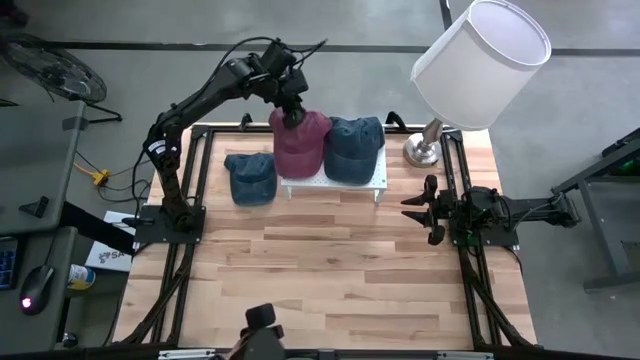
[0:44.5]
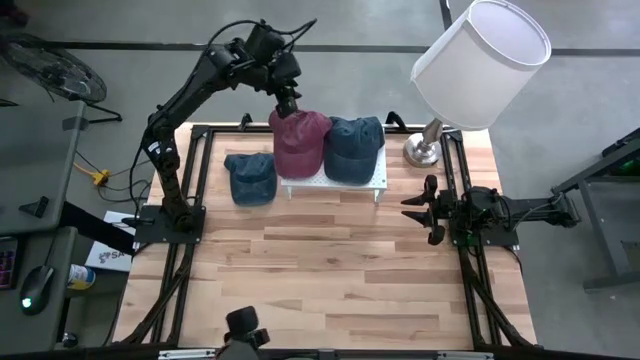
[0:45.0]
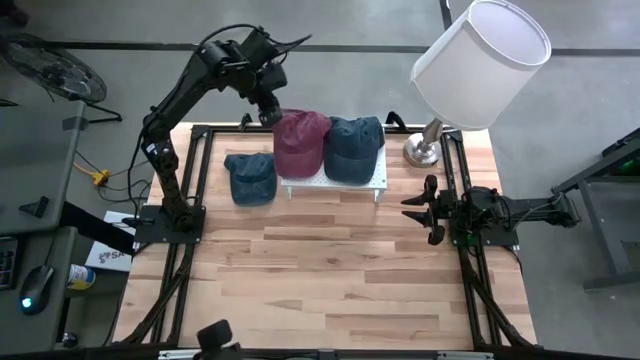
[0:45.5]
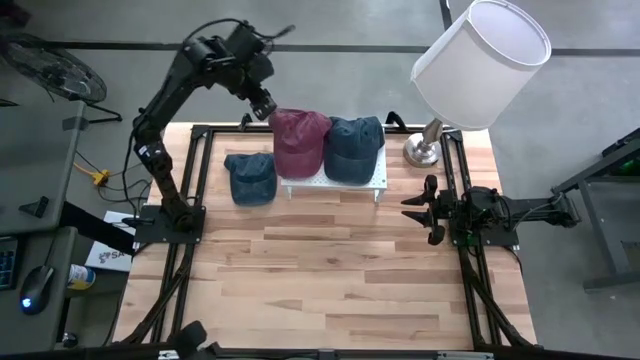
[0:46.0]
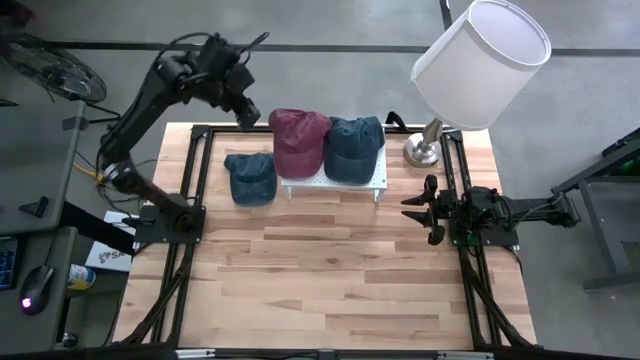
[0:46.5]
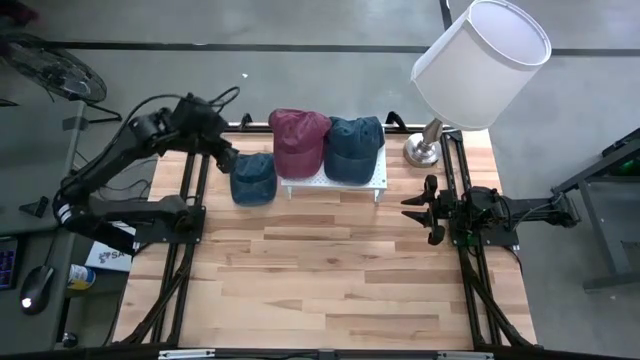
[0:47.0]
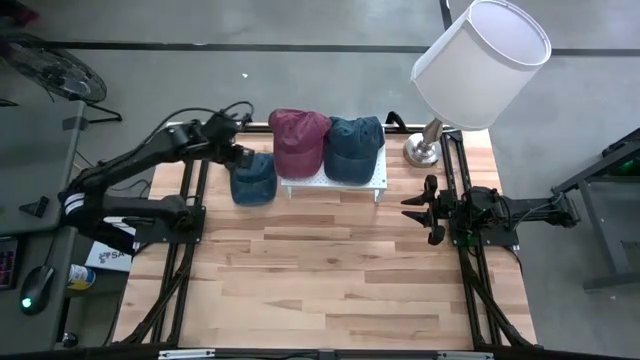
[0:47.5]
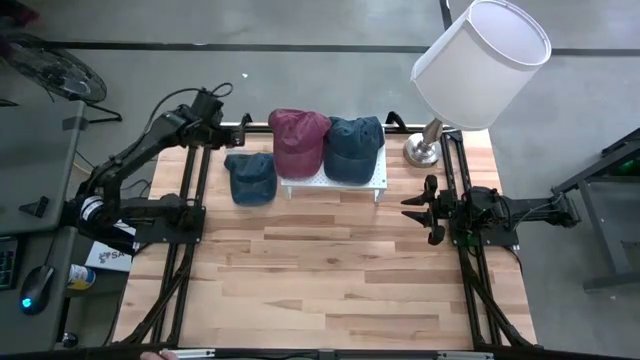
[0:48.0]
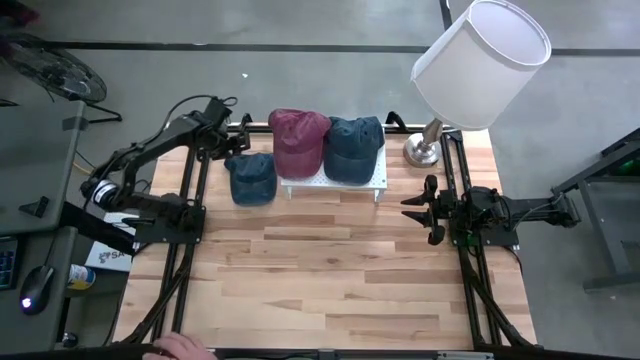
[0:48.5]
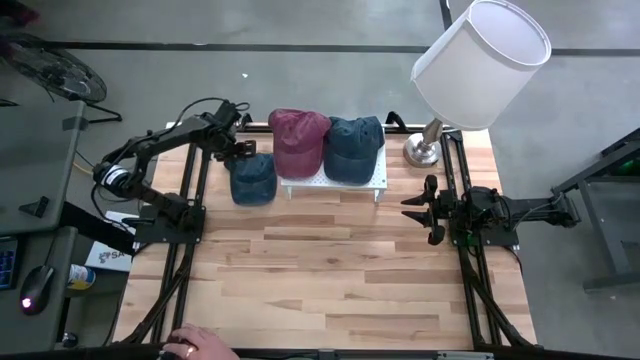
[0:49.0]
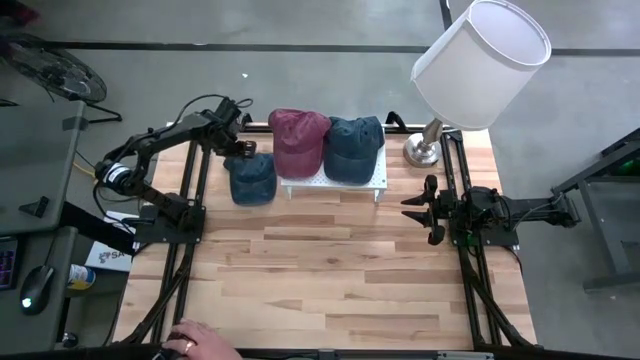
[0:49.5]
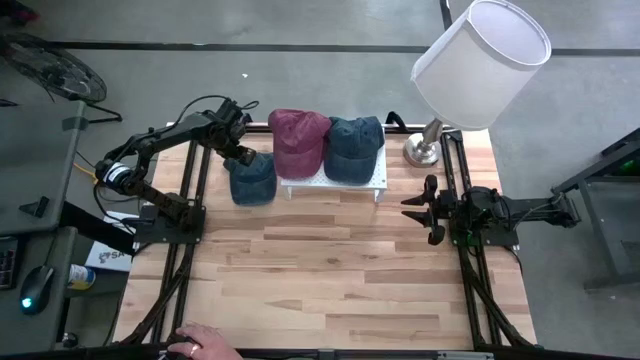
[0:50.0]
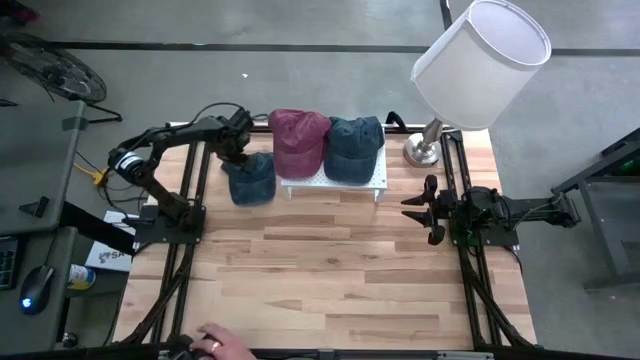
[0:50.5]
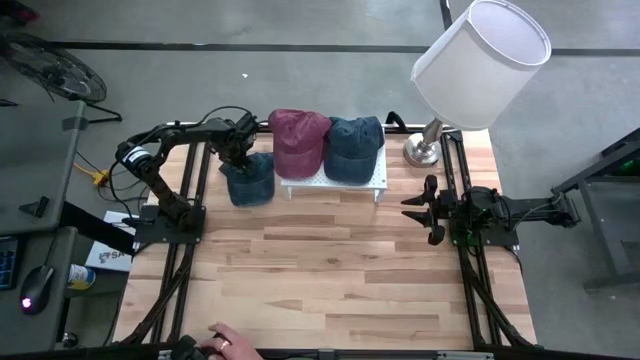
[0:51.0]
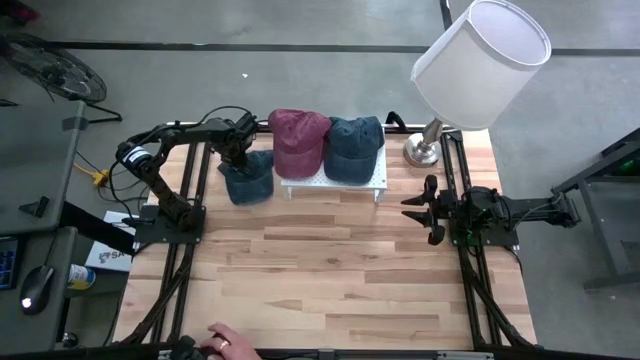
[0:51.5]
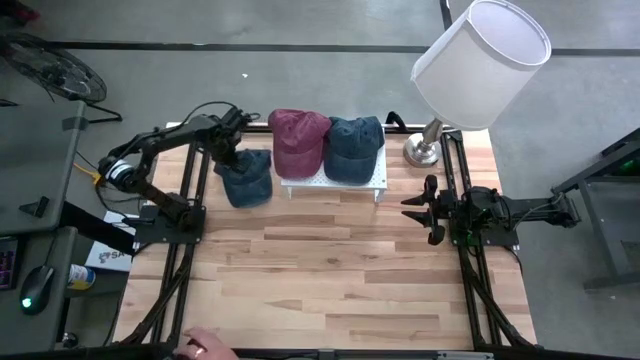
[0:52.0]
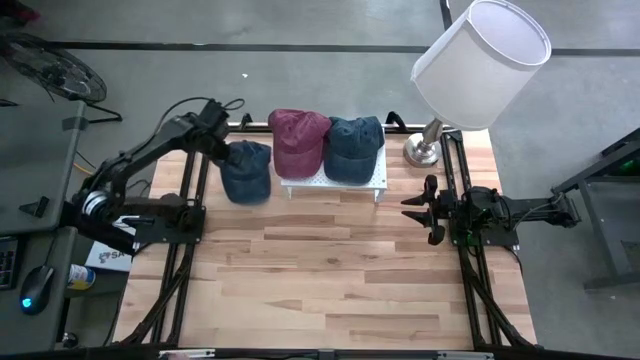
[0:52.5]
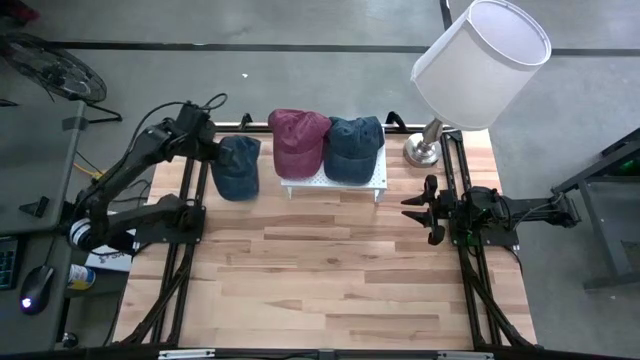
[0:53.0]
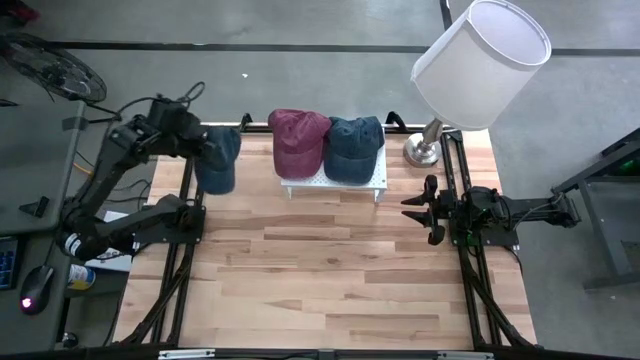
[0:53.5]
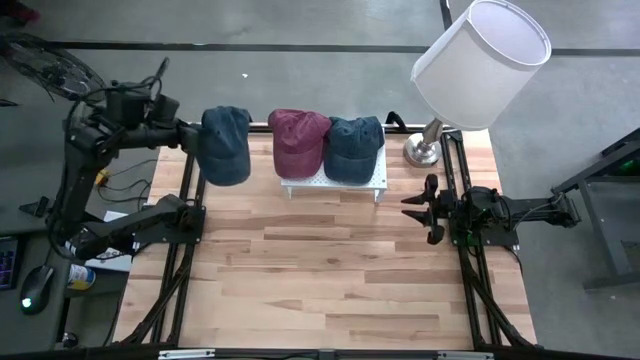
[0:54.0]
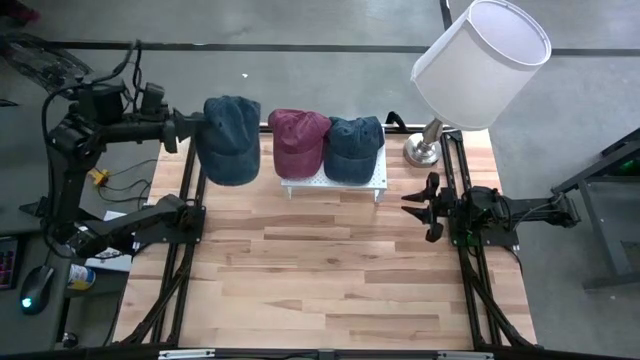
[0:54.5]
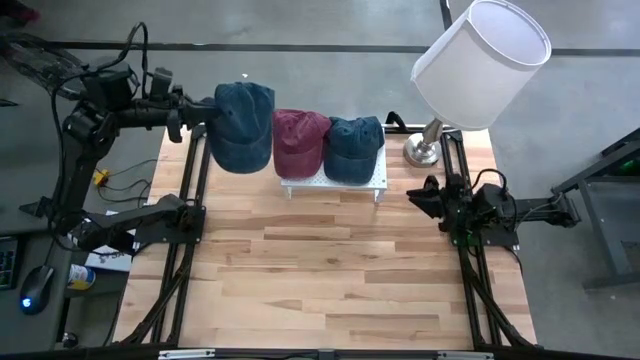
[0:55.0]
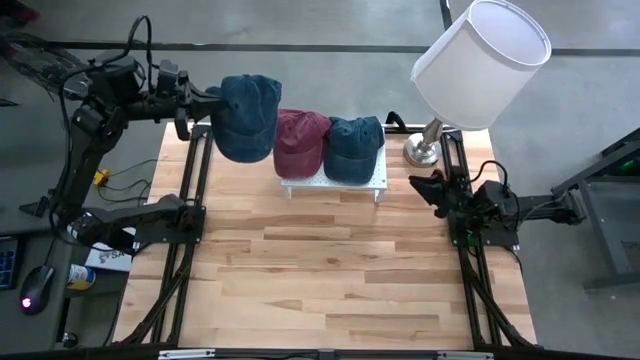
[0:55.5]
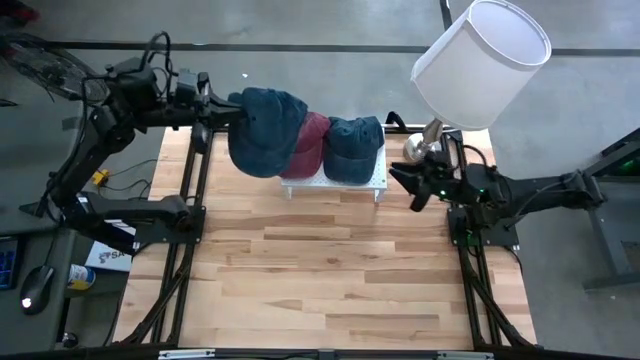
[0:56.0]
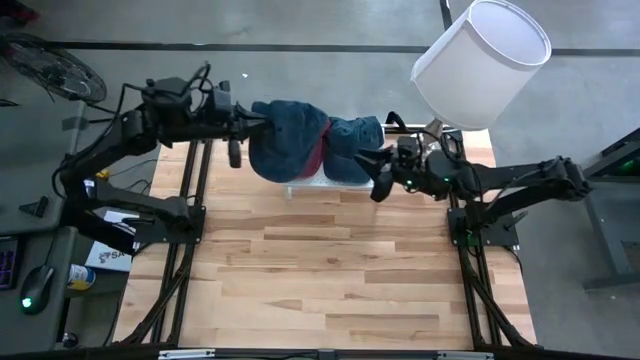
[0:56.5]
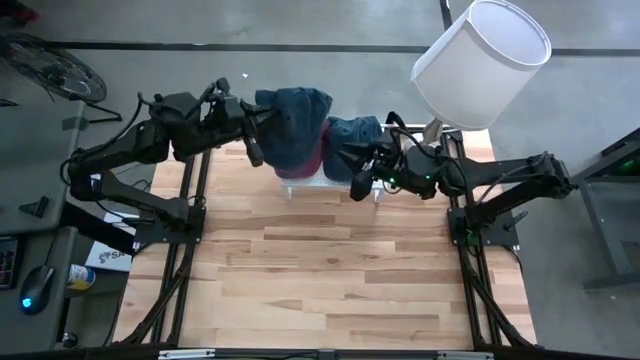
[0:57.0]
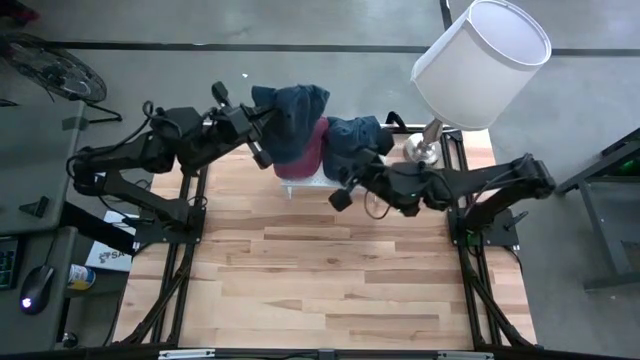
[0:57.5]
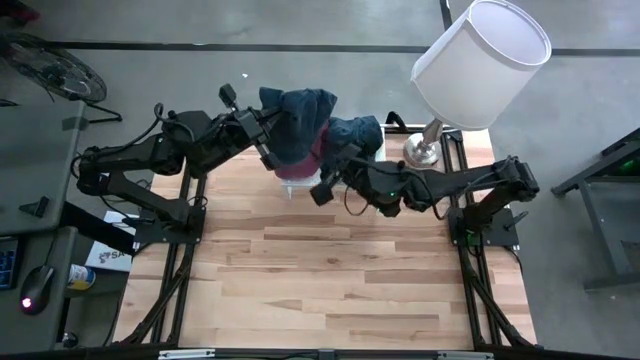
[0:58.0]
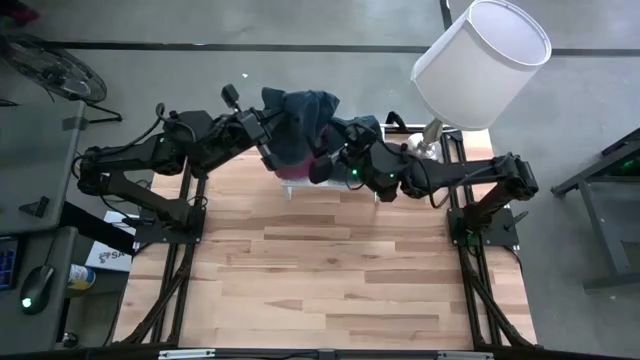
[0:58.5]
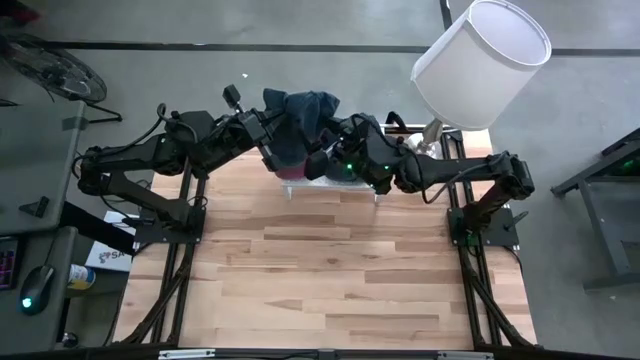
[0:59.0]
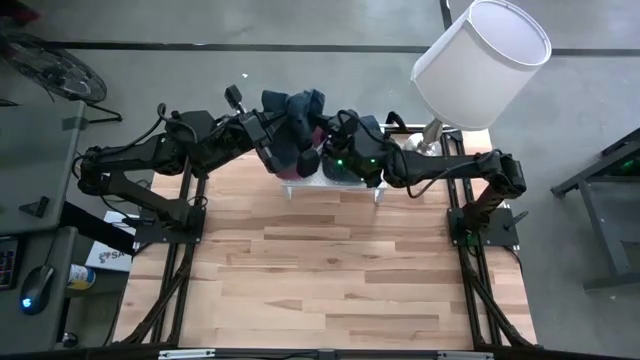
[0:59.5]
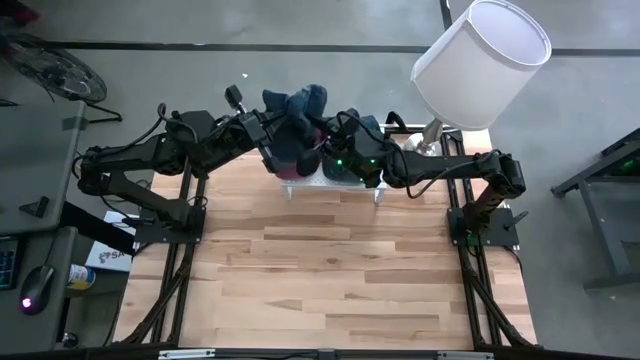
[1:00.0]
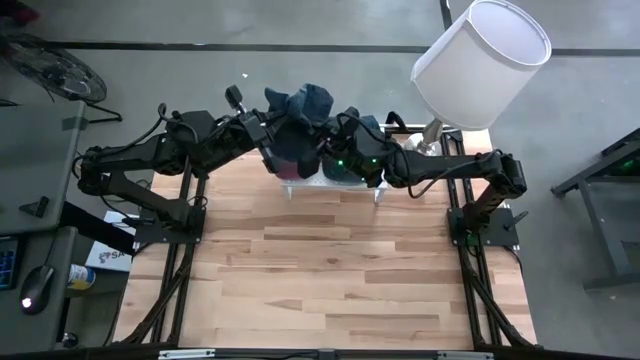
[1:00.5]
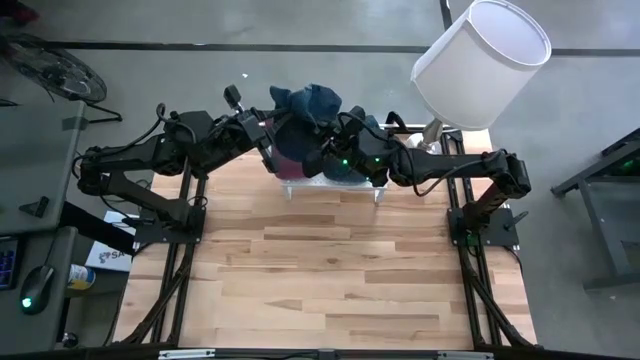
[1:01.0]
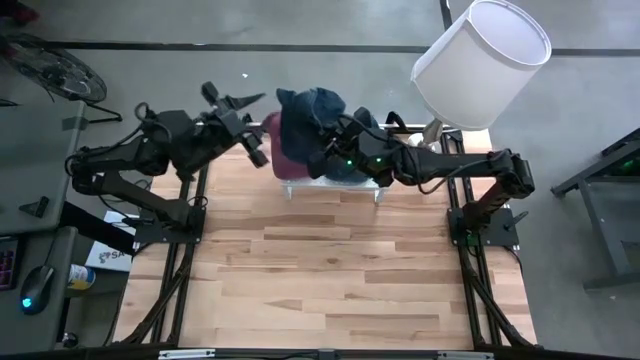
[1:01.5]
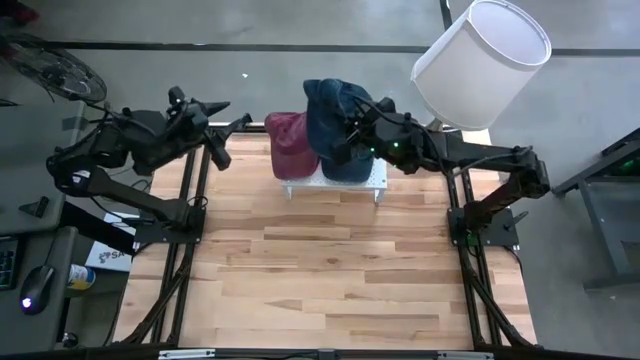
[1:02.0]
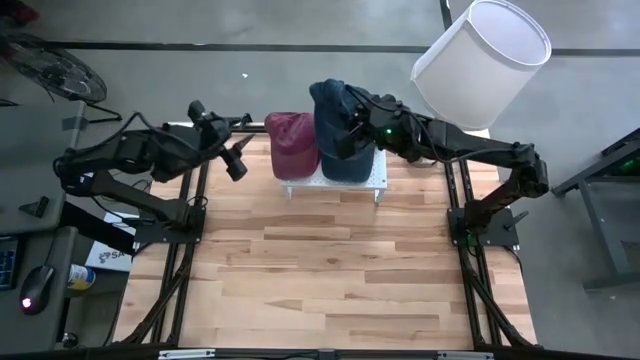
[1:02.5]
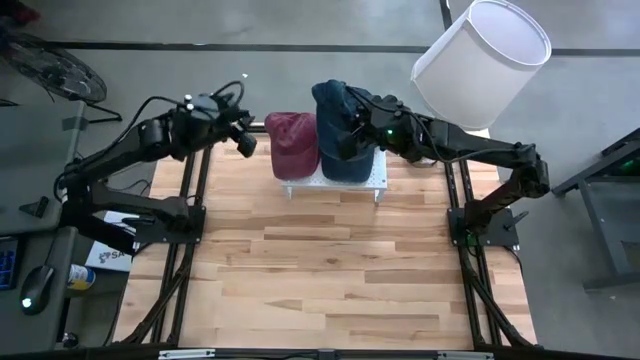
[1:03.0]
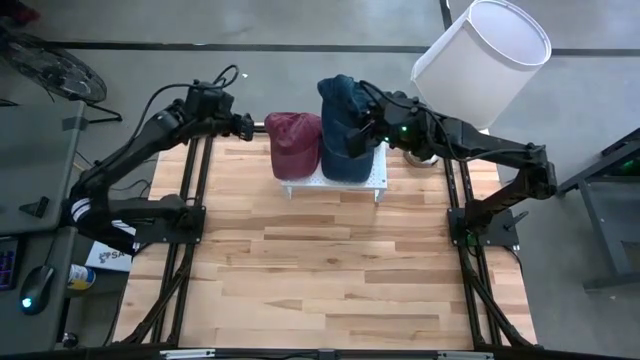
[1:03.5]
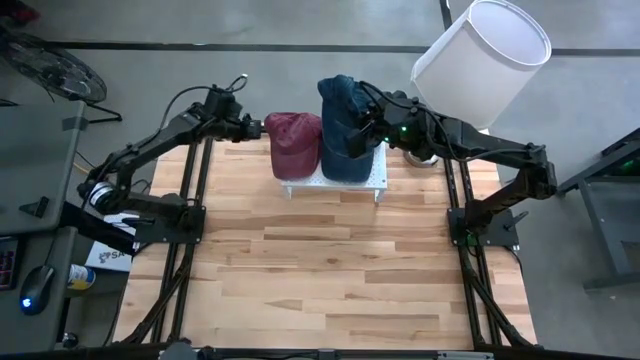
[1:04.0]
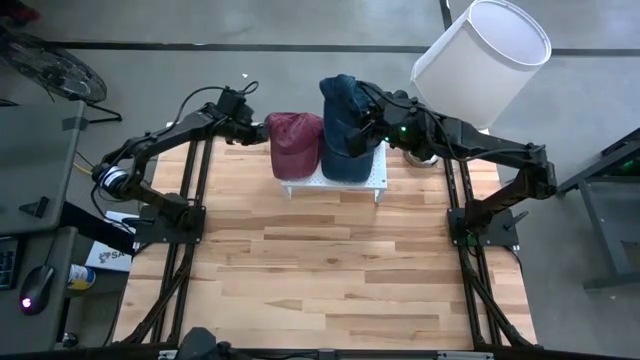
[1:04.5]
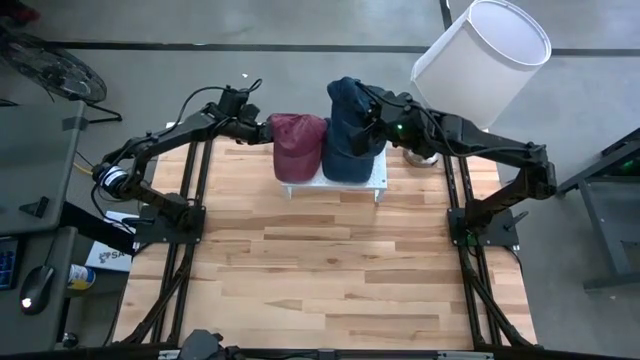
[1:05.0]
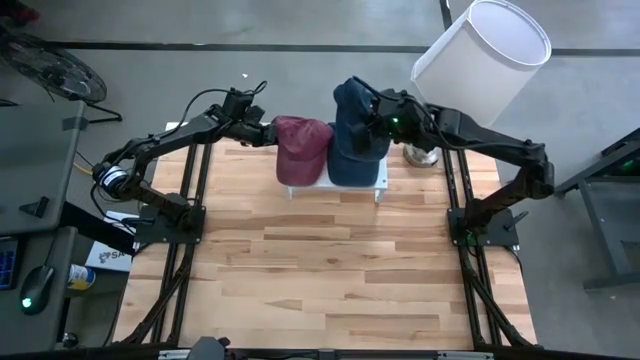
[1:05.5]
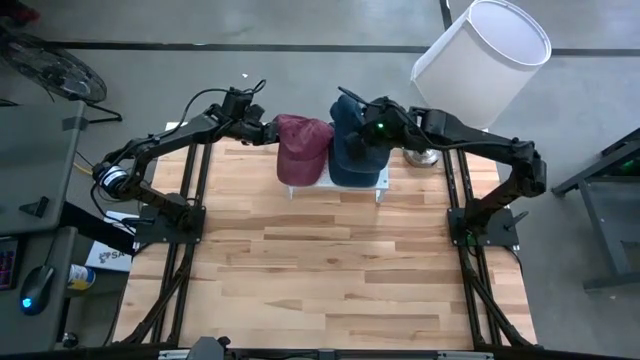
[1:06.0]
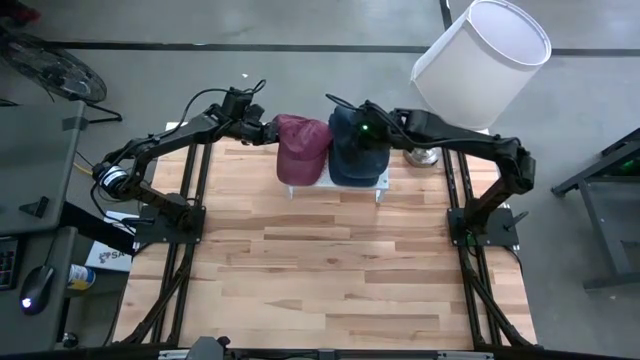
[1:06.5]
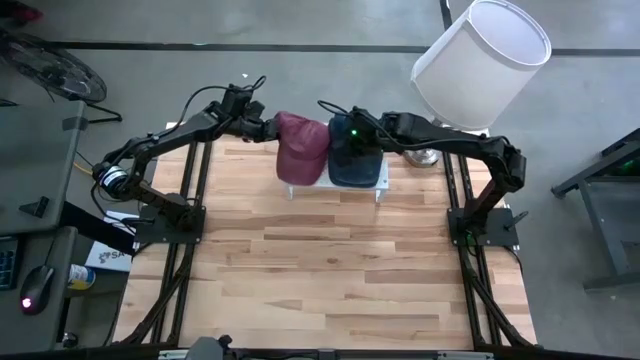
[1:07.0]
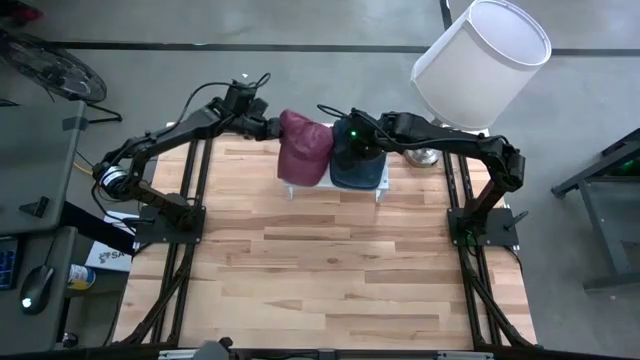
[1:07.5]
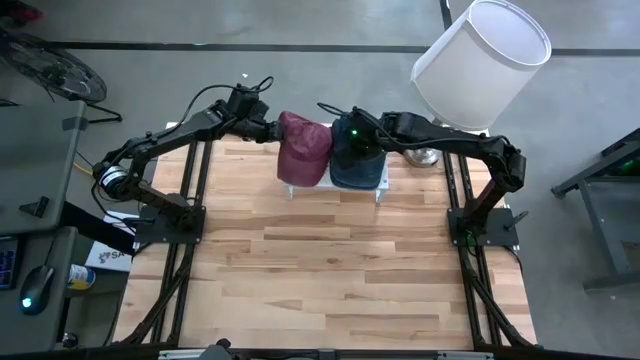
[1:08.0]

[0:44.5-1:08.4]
Task: Pick & Place hat
Stack the blue cap on top of the blue cap on the shelf
